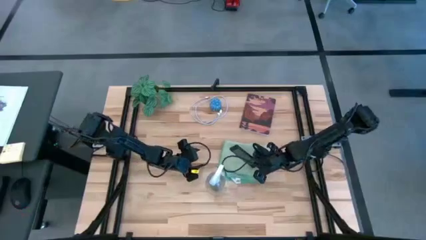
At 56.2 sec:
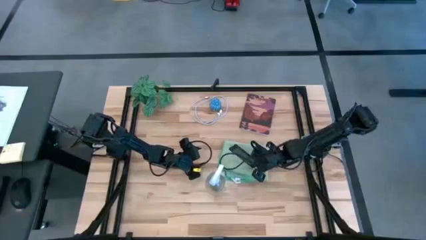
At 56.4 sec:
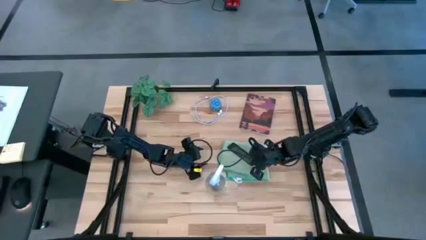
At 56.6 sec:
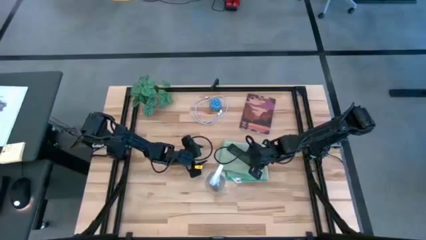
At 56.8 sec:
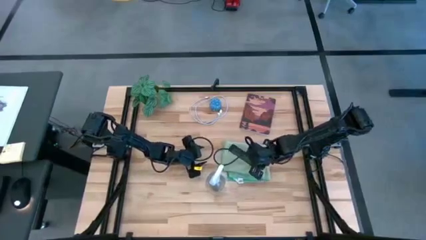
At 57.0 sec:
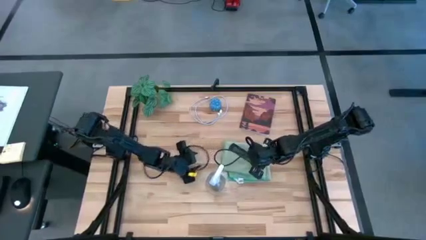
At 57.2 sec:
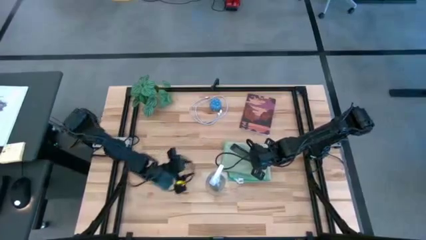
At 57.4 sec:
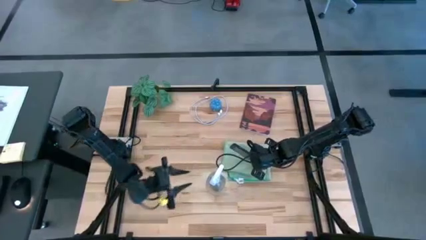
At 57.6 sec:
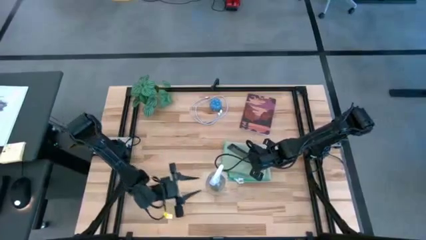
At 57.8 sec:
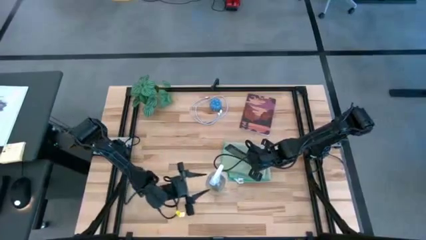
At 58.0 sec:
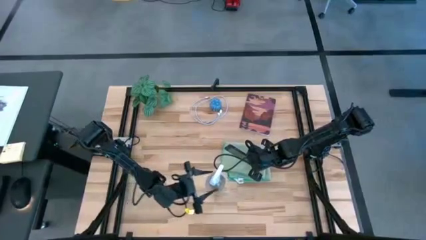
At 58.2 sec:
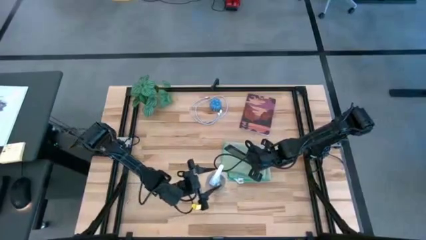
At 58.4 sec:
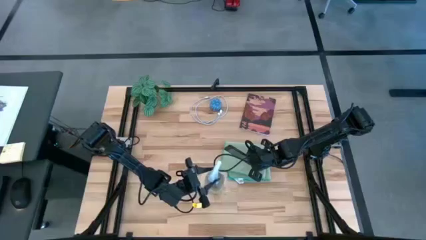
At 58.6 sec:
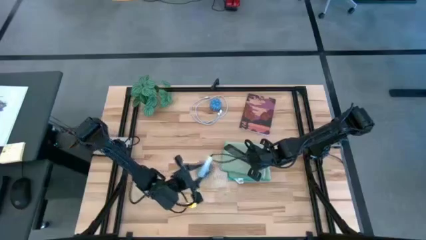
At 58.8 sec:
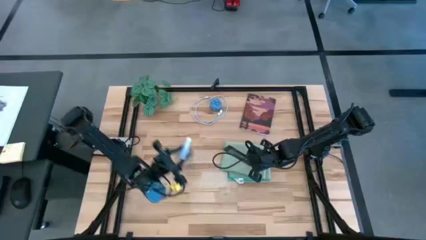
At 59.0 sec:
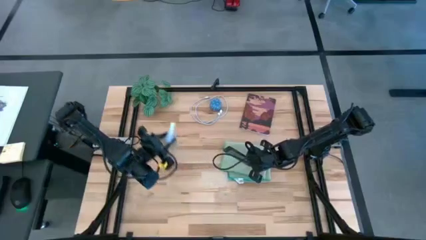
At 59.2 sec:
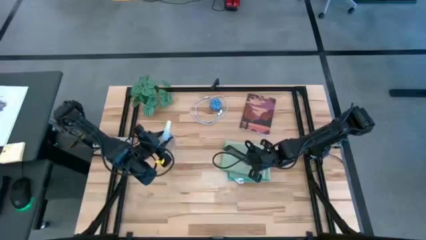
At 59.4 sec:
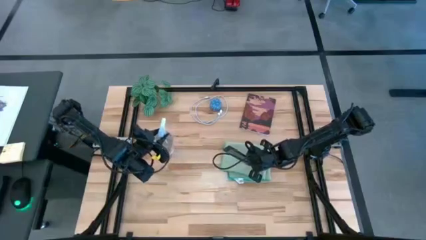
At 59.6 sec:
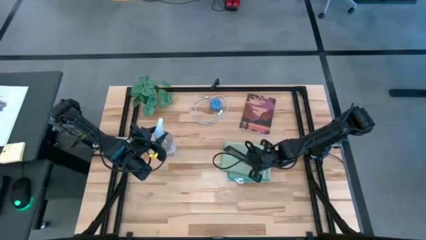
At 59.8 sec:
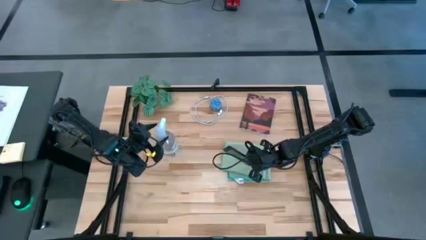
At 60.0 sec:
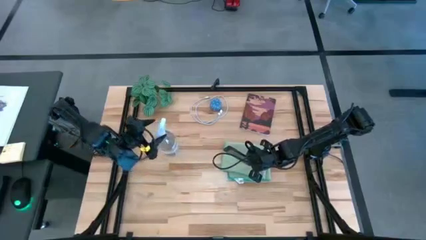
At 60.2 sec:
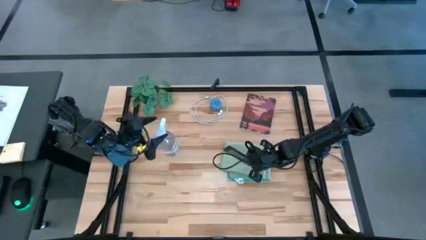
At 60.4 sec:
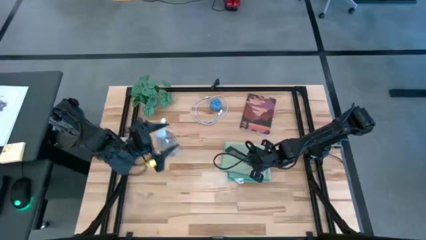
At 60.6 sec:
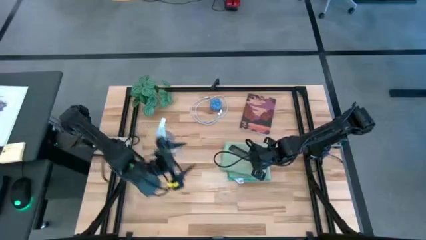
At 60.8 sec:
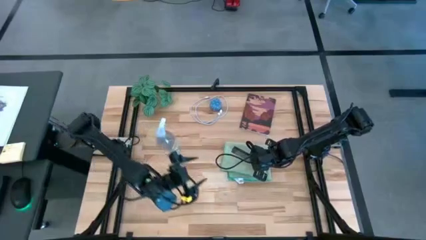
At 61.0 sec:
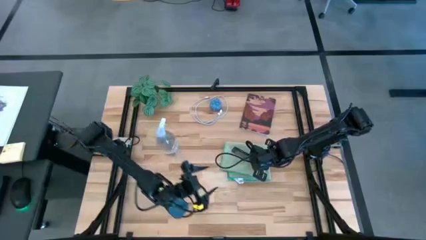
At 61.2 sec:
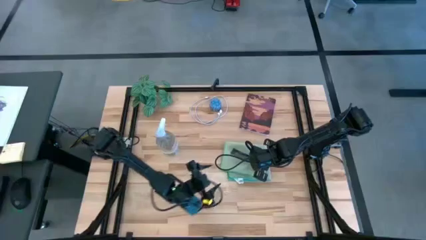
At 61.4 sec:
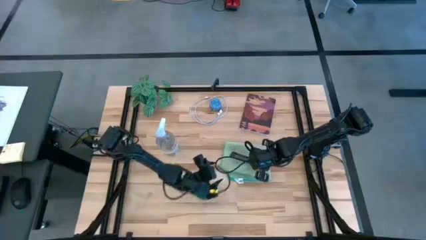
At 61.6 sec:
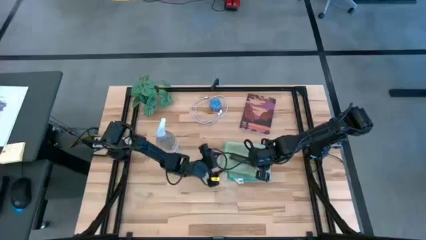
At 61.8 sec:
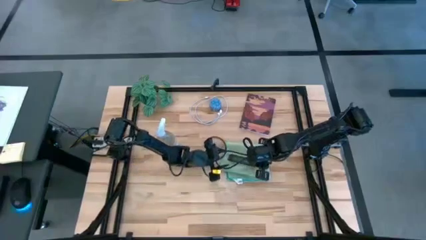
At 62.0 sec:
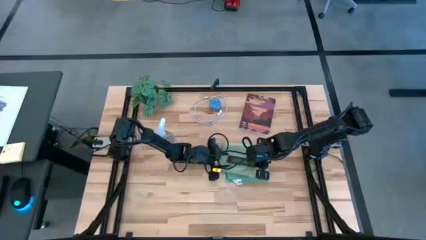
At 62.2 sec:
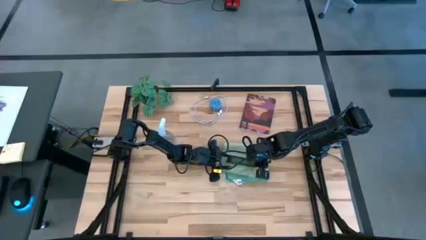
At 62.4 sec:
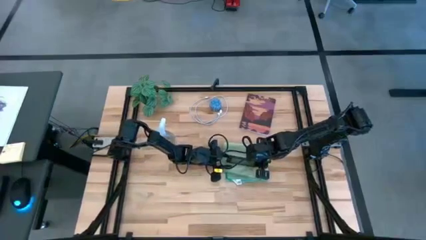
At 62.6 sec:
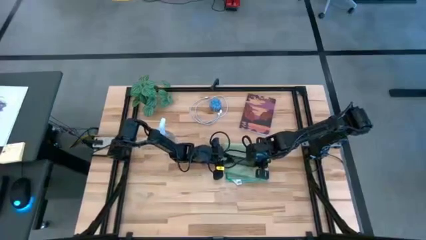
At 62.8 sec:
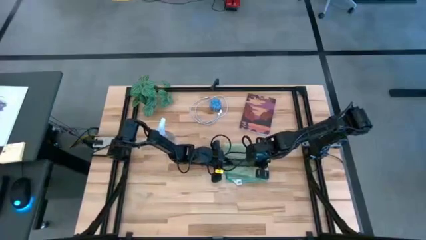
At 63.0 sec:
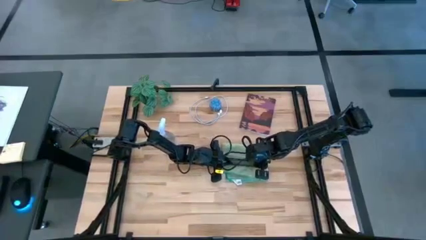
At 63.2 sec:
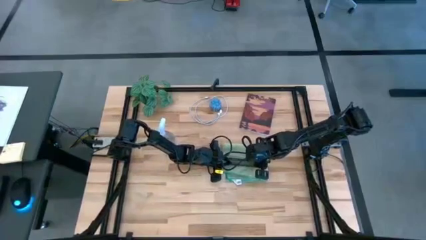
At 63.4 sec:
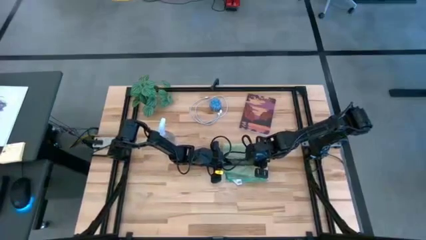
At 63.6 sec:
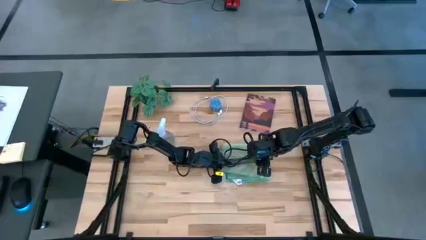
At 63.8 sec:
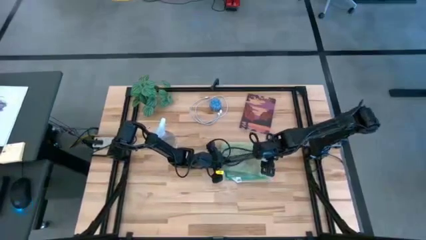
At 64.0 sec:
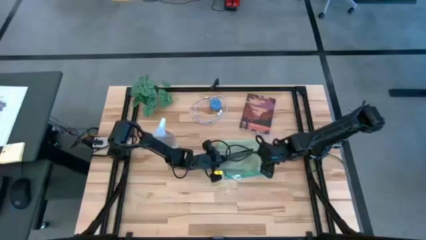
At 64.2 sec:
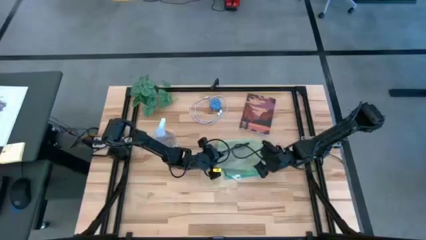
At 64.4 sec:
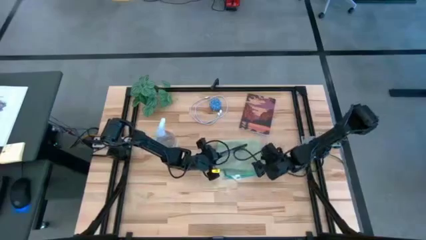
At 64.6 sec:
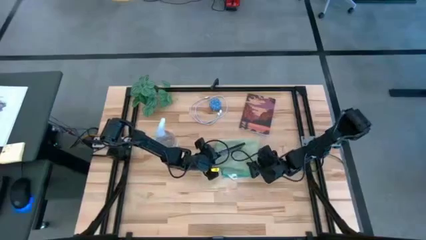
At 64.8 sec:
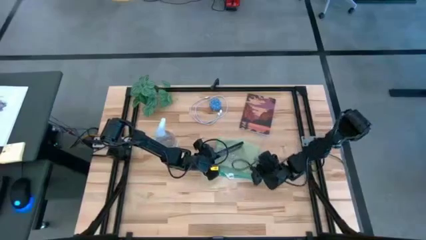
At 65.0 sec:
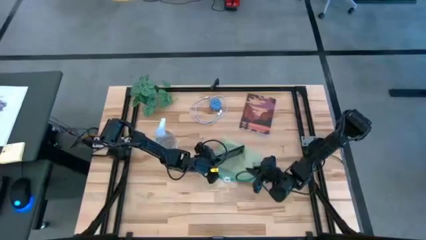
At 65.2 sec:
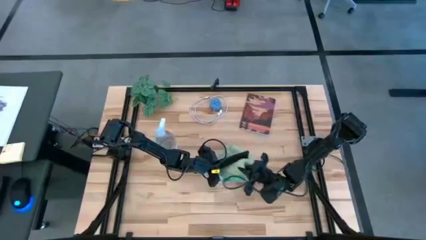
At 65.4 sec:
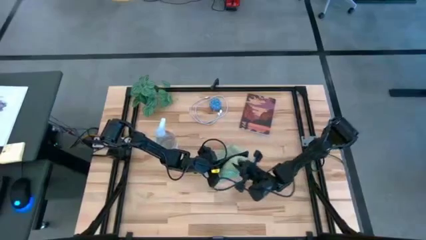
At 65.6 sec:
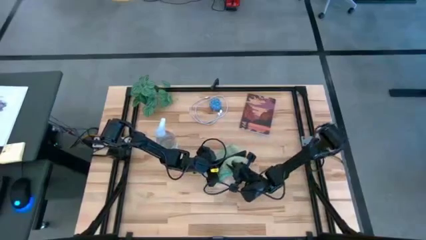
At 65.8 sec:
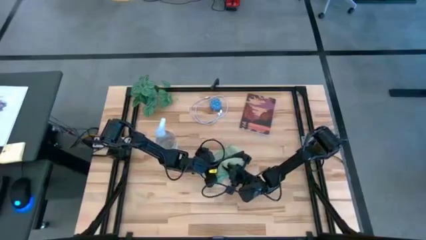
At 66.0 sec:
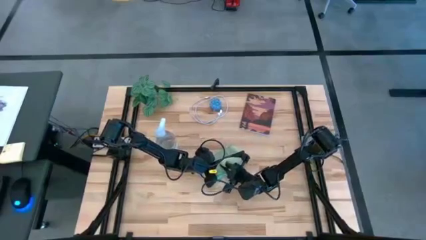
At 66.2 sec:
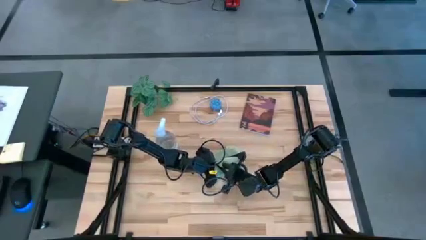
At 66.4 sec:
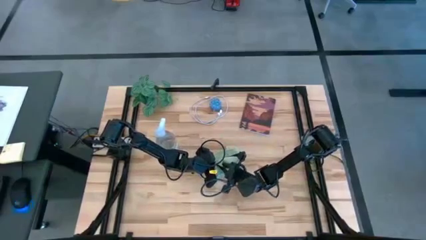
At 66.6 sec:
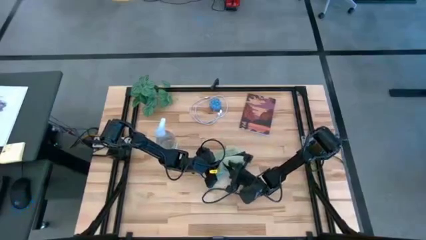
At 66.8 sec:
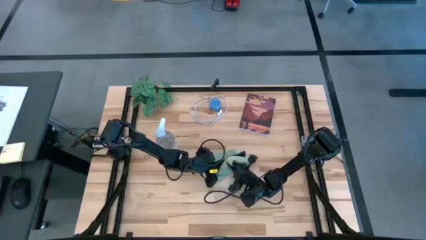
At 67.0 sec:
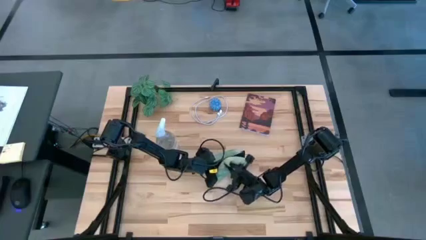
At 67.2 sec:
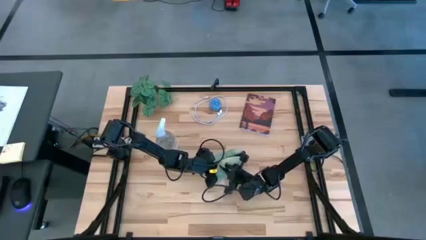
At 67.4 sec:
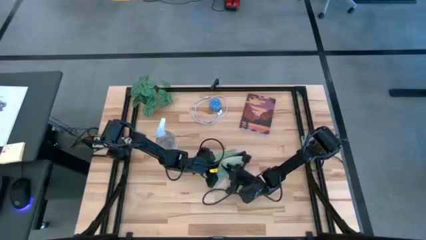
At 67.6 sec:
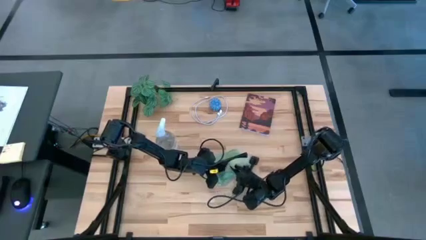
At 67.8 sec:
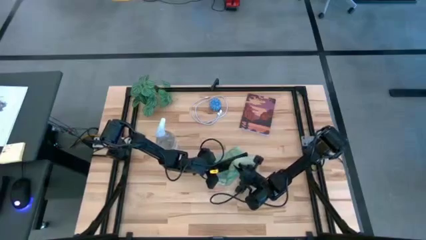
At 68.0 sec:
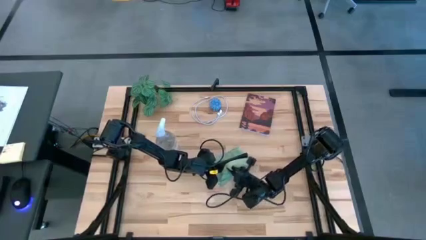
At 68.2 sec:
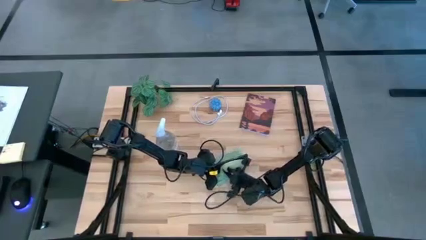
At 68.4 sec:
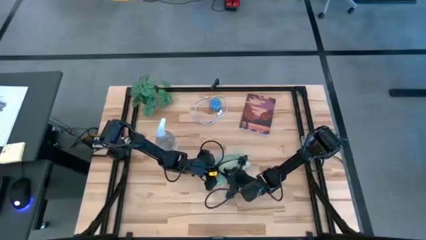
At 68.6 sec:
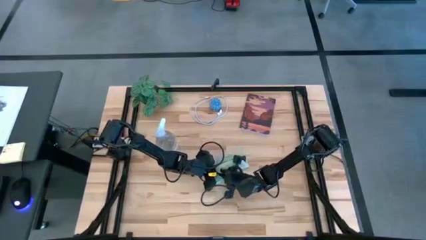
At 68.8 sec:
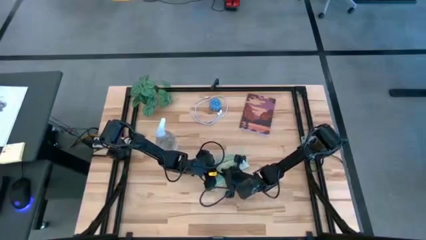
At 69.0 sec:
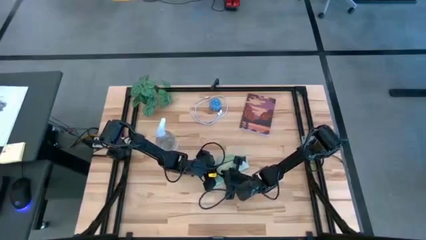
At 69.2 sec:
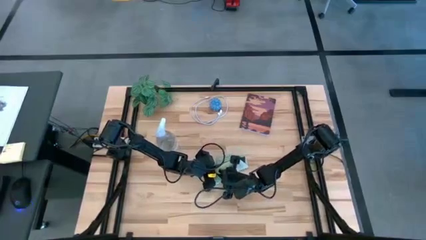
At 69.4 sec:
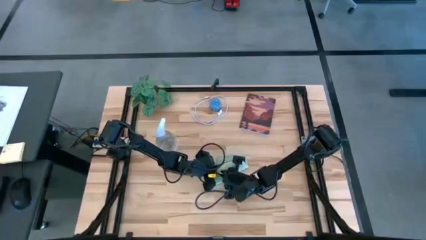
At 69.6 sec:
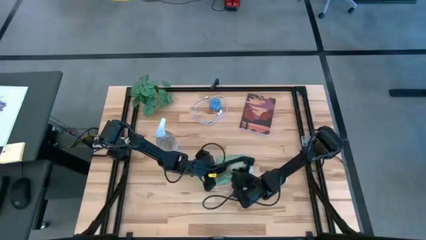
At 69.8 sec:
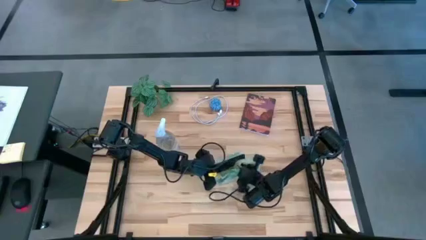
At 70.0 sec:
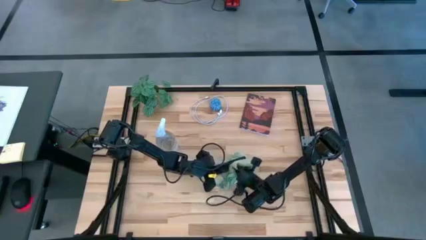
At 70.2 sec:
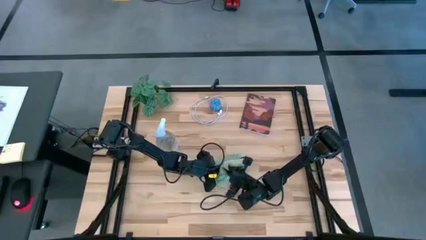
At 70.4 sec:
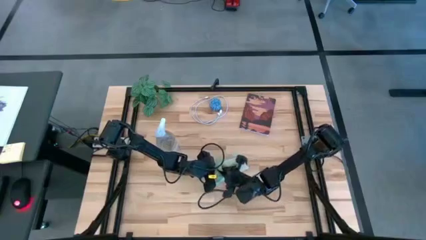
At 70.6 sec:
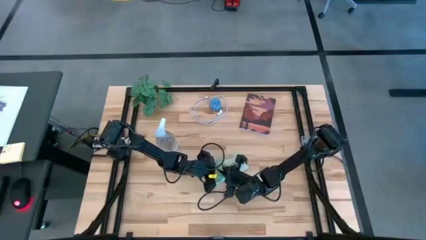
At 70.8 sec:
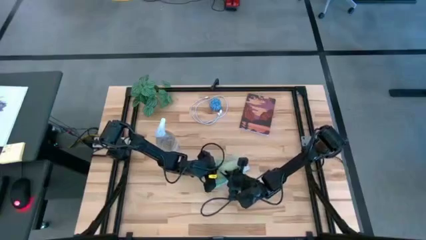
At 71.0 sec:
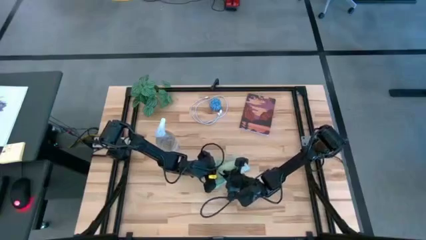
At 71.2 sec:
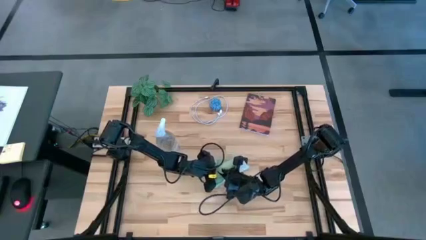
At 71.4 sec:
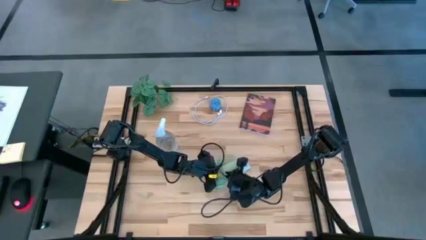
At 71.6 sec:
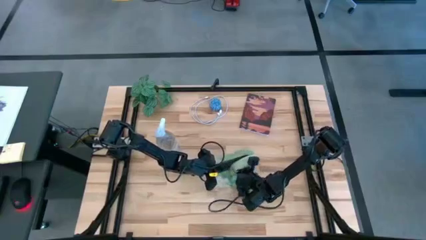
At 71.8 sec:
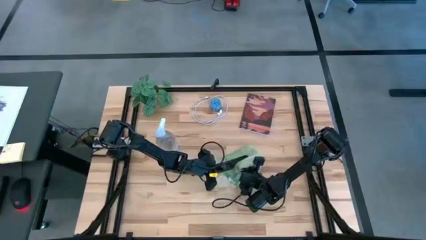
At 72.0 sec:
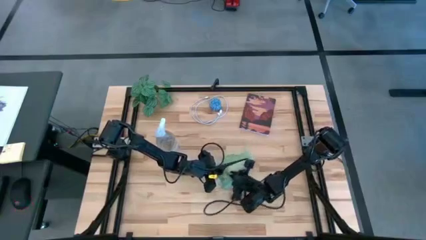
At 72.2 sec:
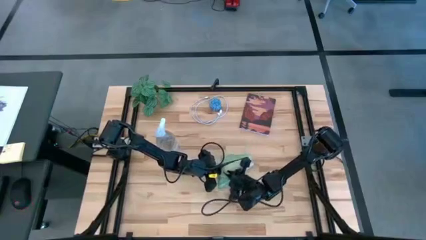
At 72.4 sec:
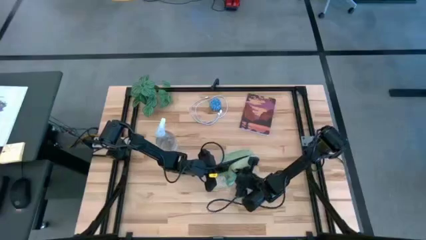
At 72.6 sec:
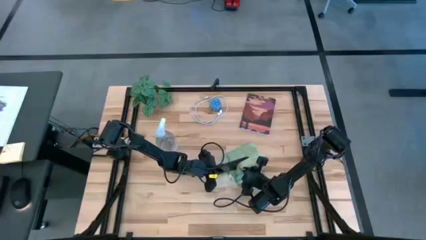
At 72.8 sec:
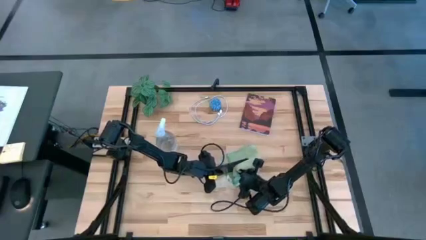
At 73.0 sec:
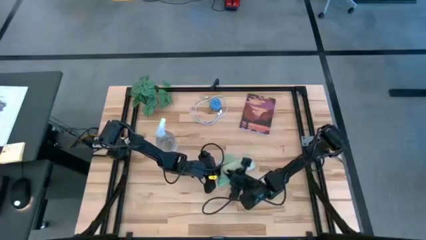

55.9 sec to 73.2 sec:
Task: Apply microfiber cloth
Wipe the front of the black cellphone with the green microfiber cloth
